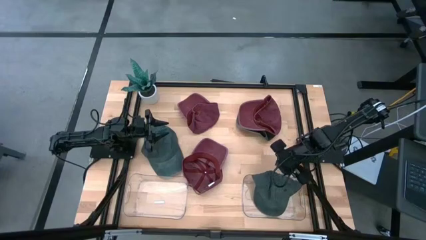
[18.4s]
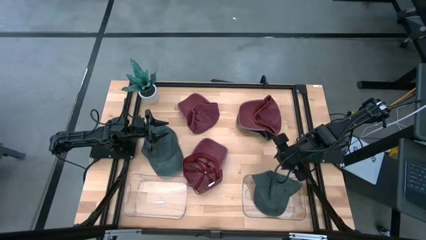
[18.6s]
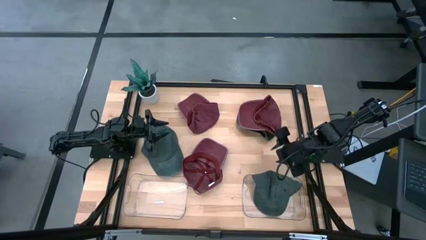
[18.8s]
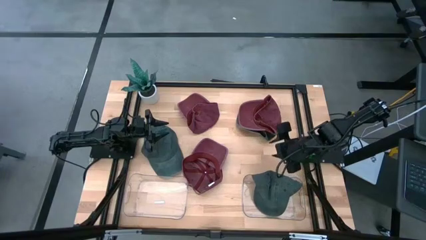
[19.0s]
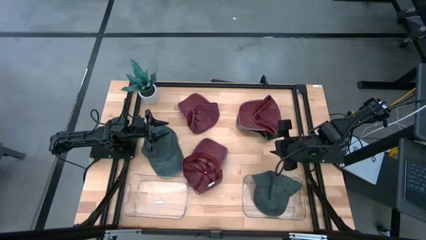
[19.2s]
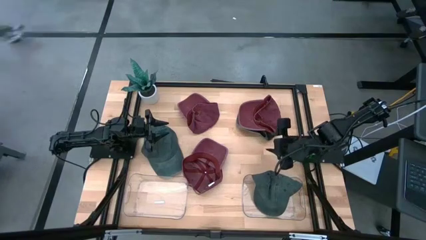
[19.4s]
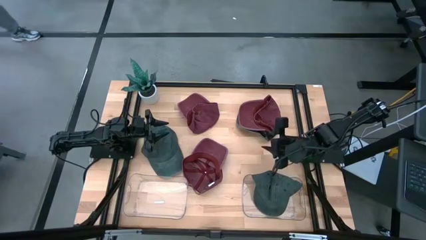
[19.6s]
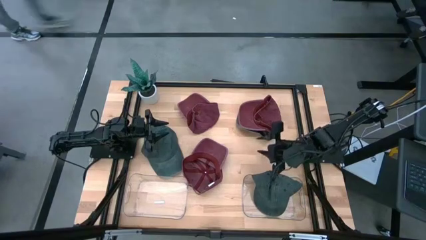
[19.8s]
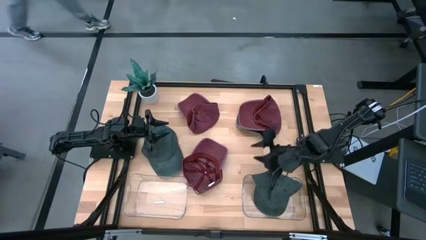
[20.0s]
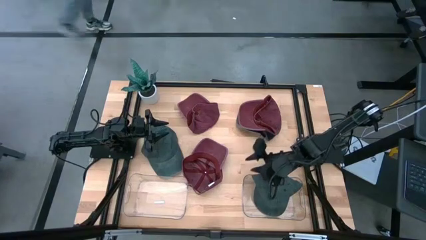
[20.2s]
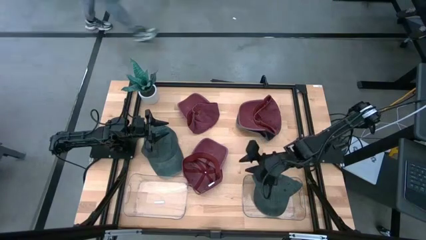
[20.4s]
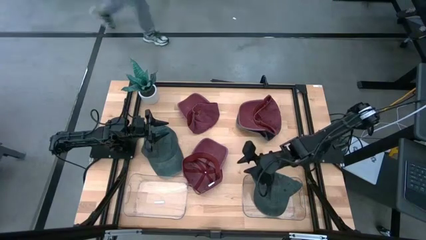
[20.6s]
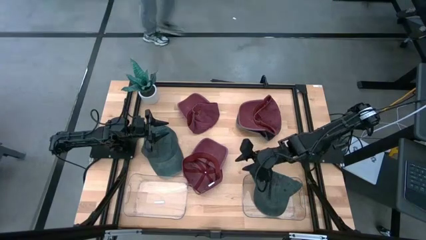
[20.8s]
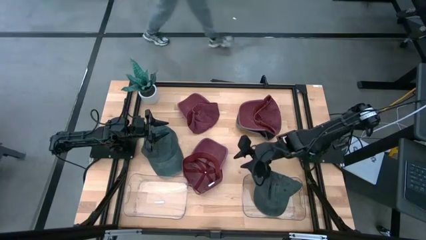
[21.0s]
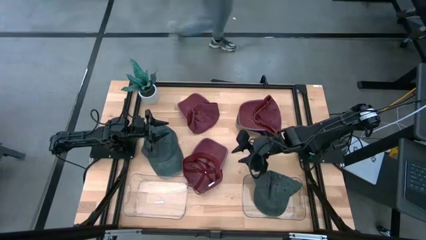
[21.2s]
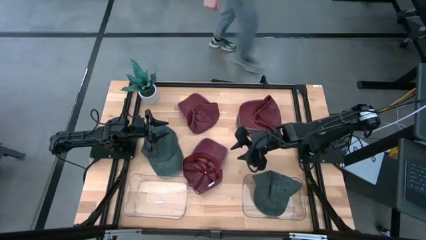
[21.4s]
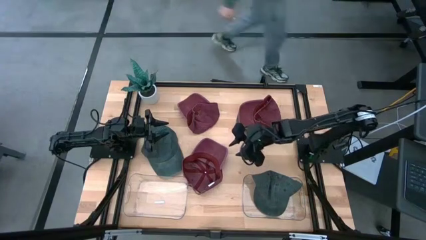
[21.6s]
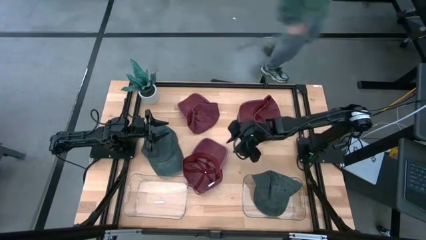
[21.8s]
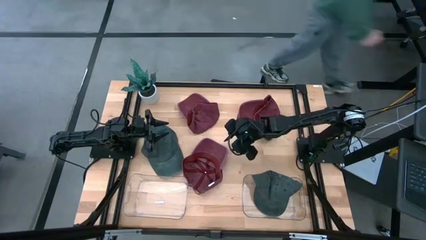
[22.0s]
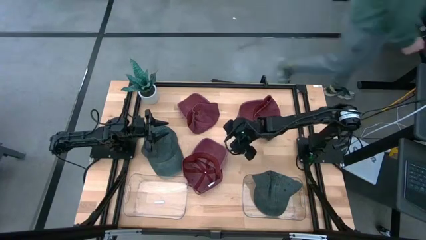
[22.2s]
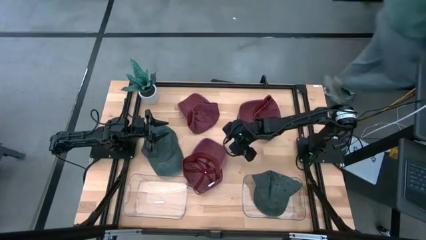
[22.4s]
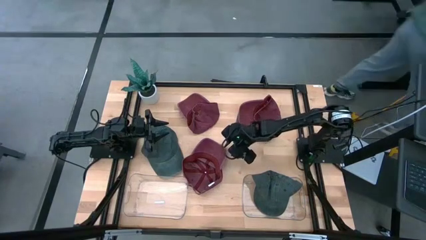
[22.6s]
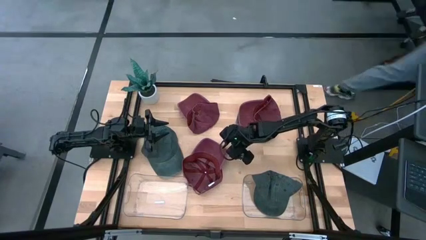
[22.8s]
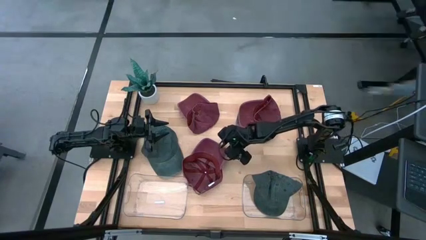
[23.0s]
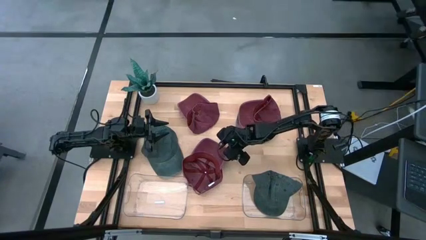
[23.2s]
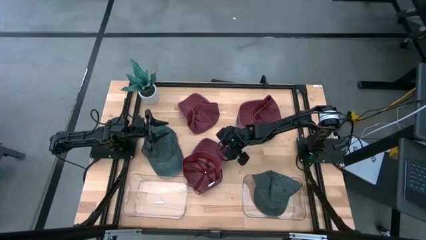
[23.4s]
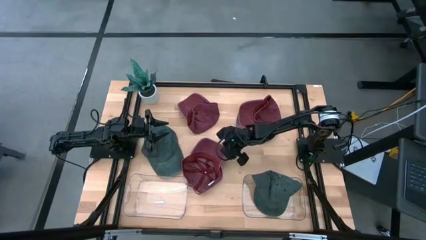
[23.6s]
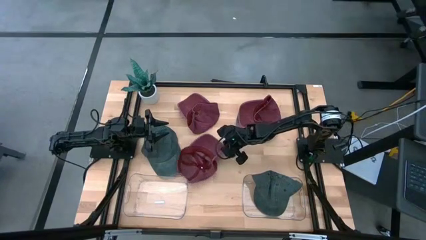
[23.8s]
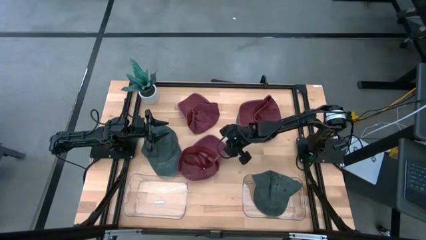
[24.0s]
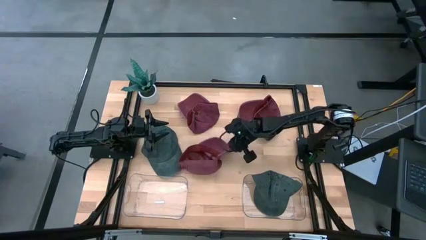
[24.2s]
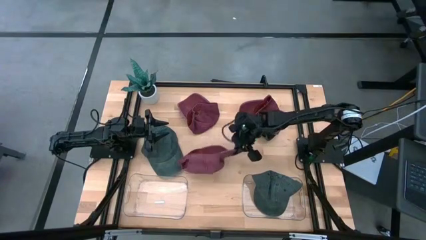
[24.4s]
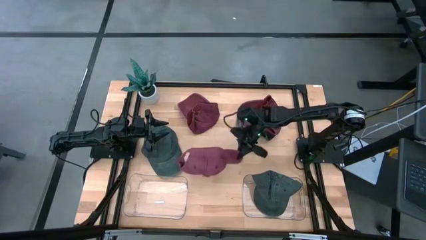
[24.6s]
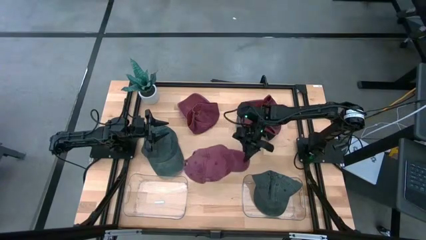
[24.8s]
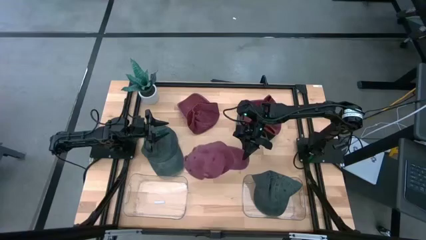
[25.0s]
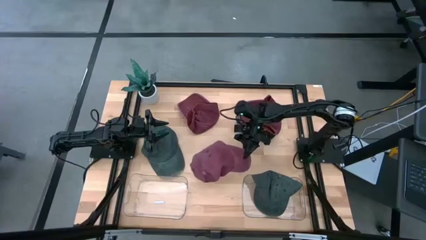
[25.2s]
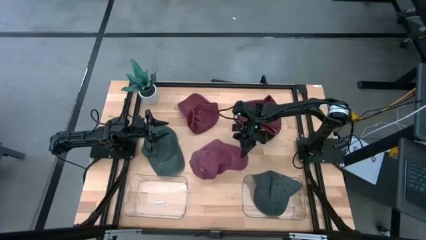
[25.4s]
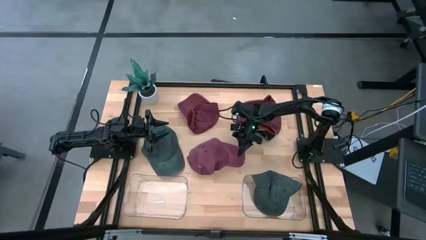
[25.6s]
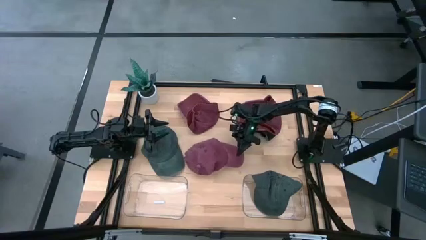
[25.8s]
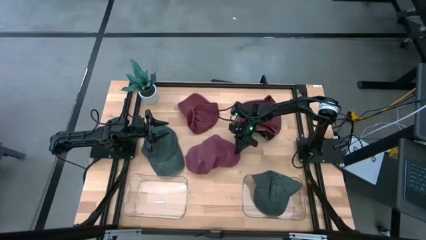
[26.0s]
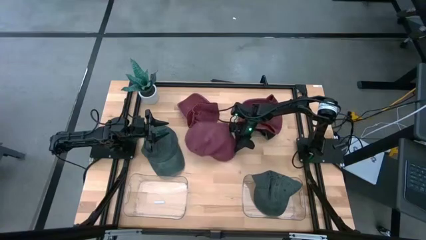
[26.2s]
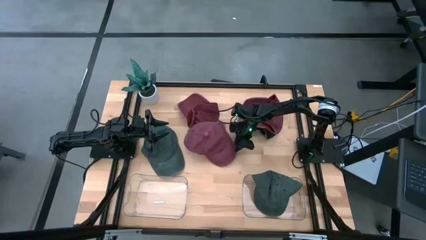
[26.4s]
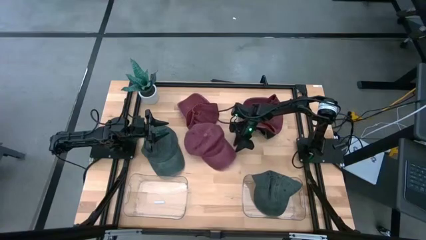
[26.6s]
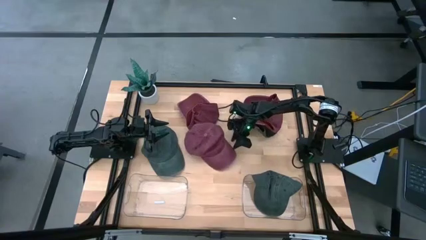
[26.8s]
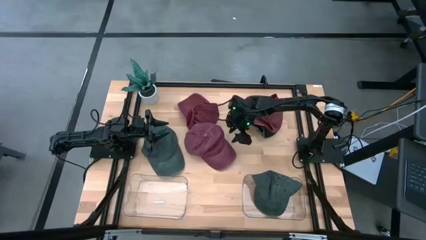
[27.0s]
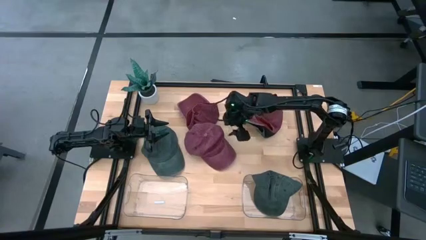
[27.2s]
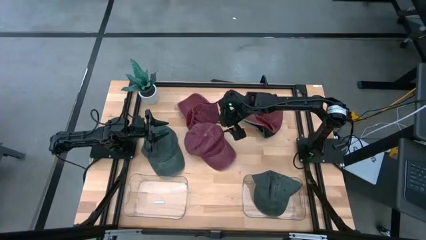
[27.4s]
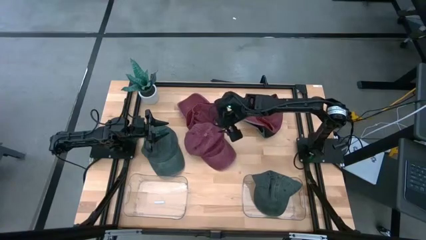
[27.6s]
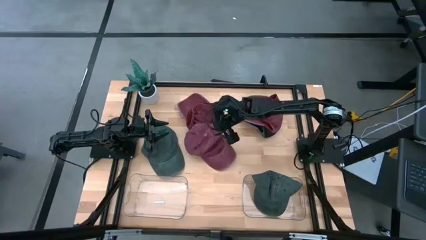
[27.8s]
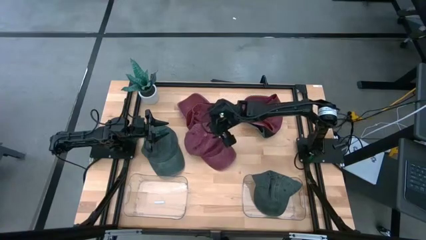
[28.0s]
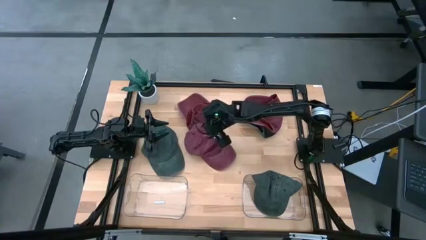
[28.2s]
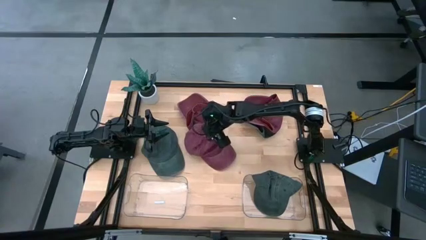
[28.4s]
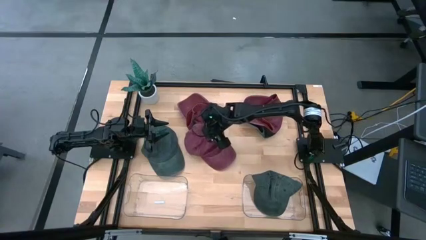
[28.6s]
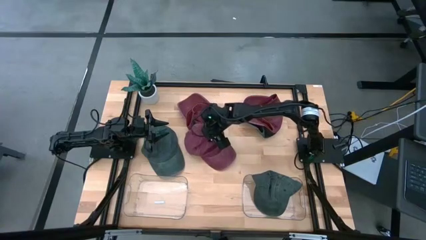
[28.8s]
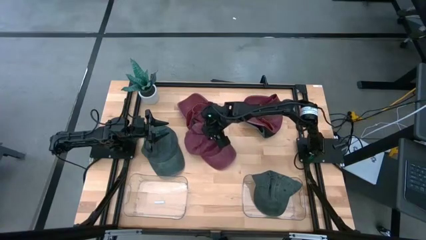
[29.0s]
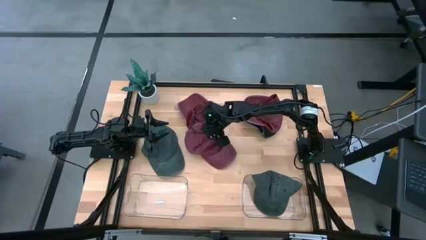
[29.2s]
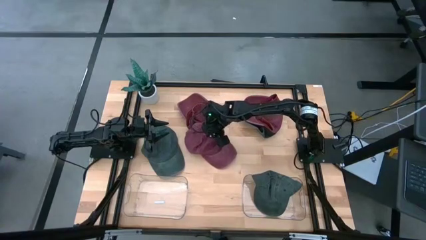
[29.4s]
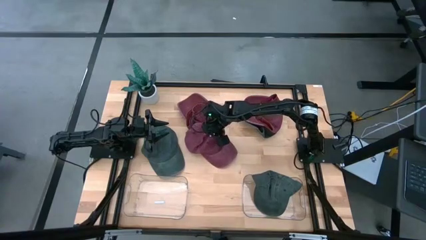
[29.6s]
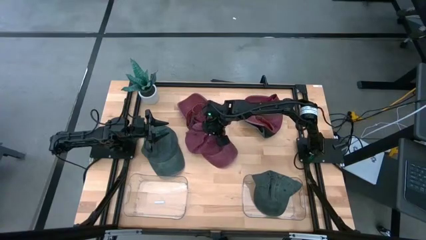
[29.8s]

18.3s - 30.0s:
Task: Pick & Place hat
Put the bottom red cap into the left transparent bin

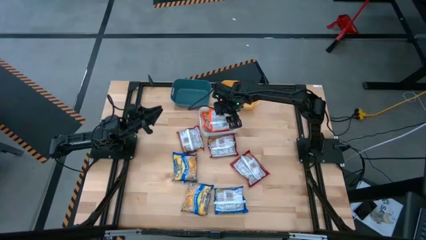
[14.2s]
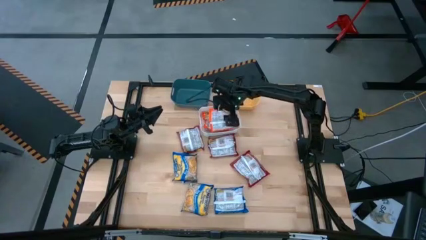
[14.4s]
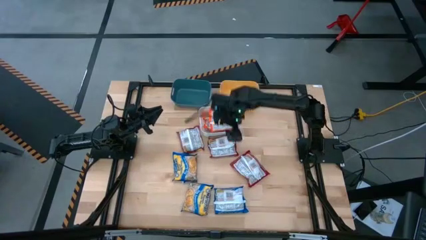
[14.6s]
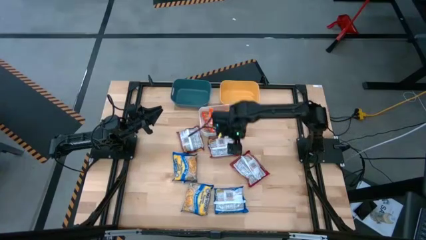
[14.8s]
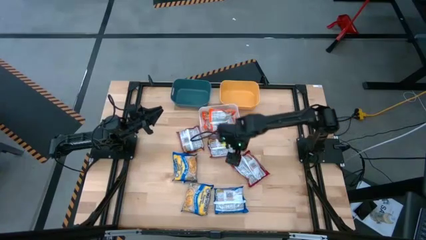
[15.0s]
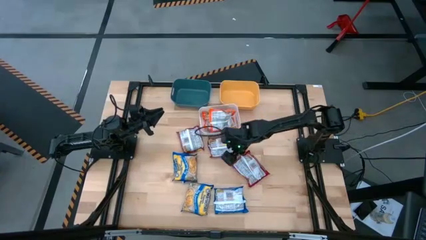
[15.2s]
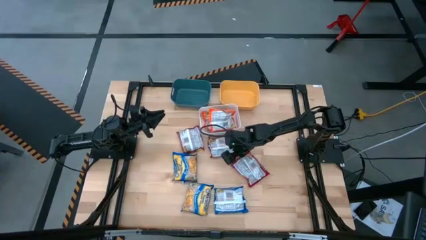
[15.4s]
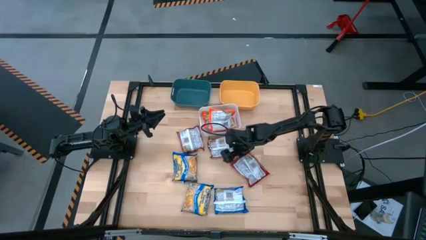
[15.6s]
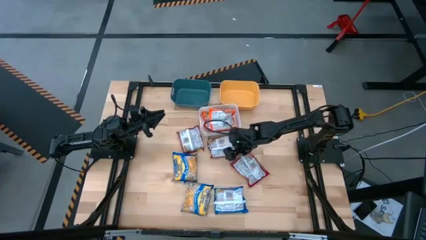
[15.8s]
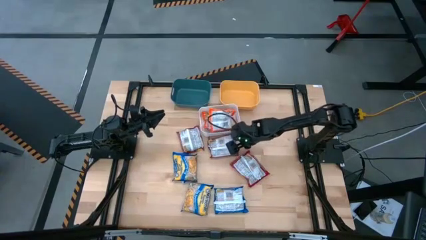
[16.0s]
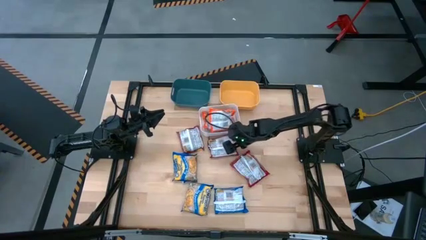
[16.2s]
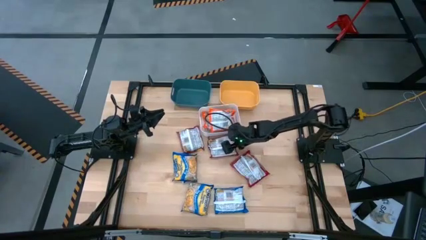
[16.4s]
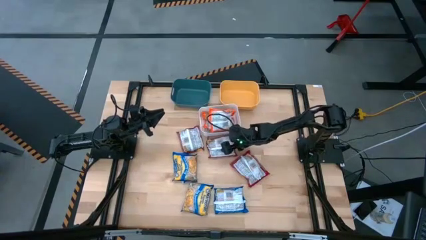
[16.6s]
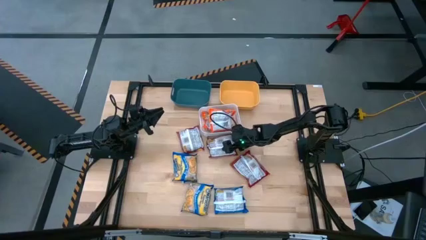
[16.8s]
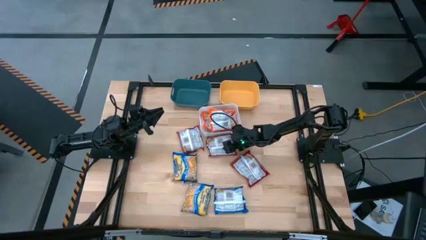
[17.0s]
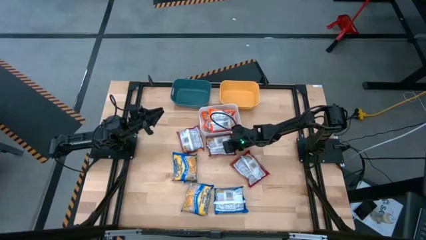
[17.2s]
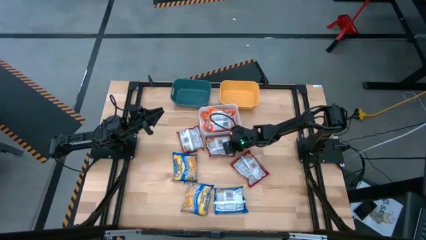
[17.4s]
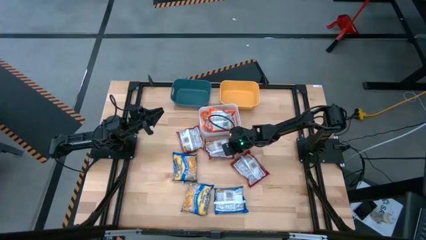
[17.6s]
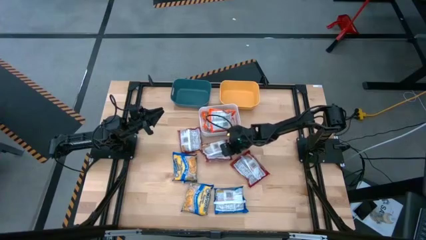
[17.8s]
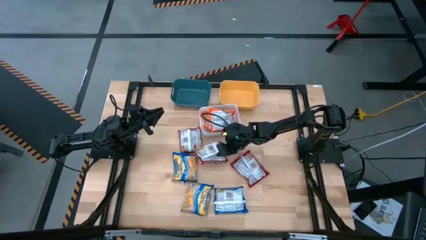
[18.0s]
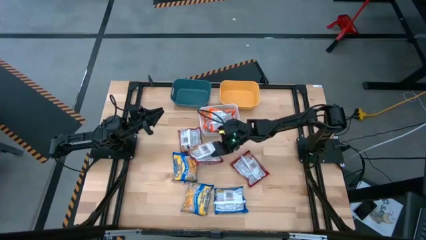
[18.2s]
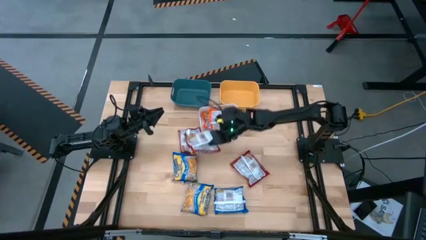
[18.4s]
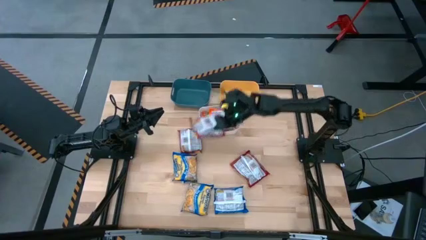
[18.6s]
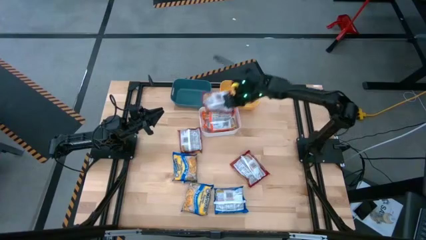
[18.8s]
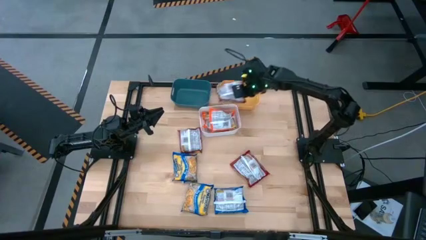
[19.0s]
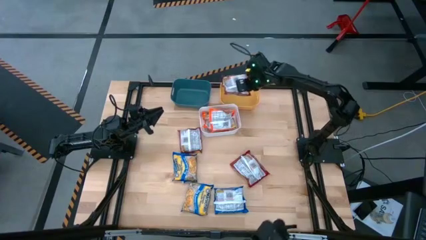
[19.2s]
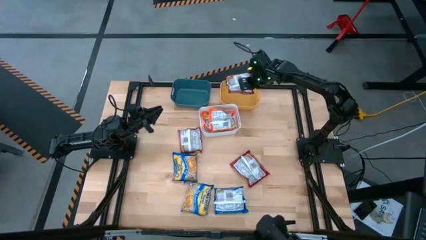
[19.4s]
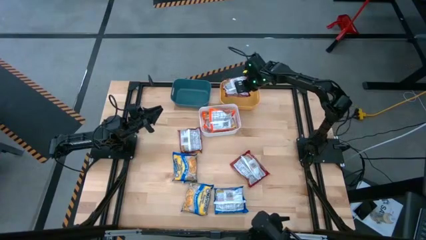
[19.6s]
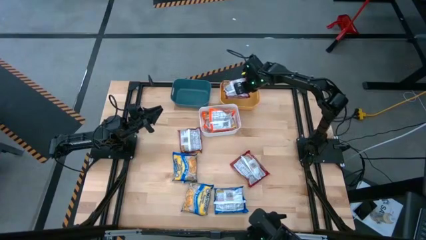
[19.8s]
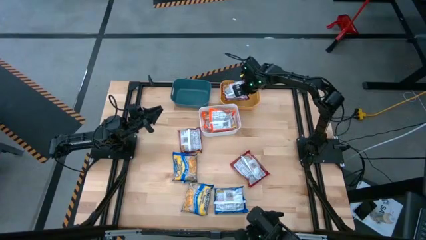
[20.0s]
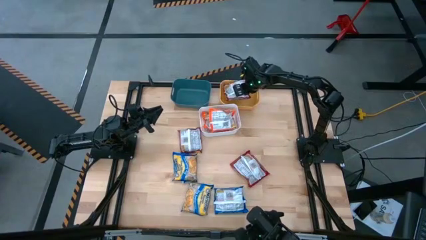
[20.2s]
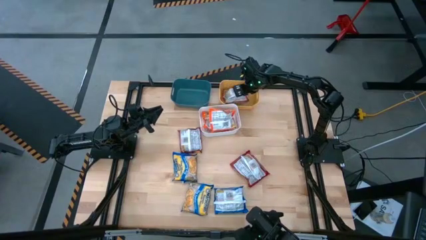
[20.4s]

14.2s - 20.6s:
Task: Sort Maruchan noodles
Put the middle red noodle pack into the yellow bin
